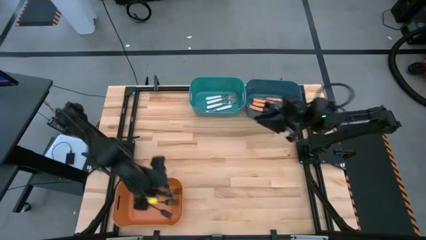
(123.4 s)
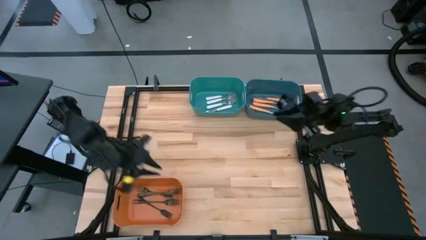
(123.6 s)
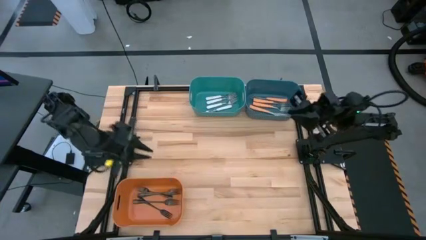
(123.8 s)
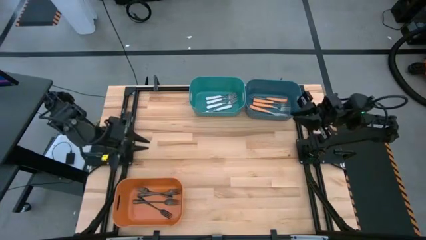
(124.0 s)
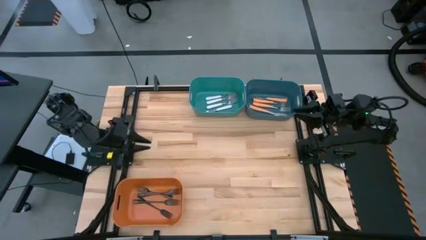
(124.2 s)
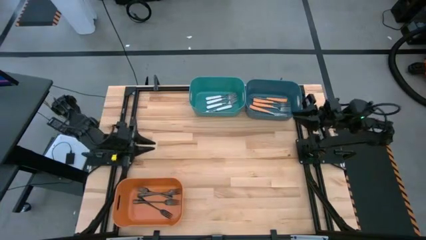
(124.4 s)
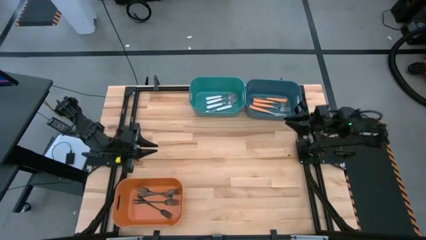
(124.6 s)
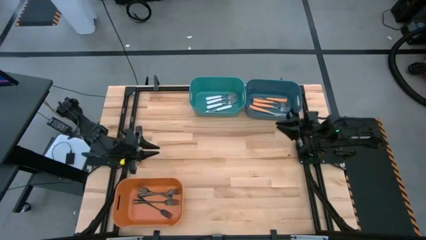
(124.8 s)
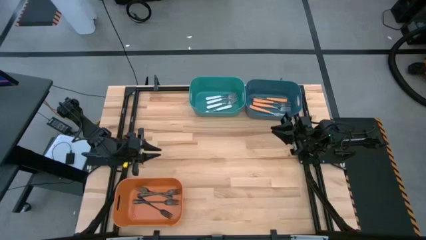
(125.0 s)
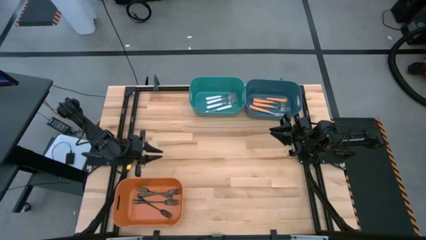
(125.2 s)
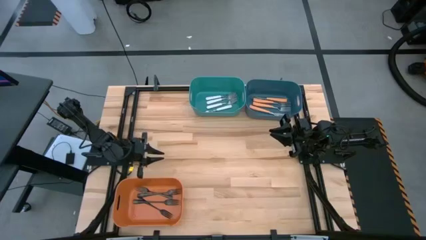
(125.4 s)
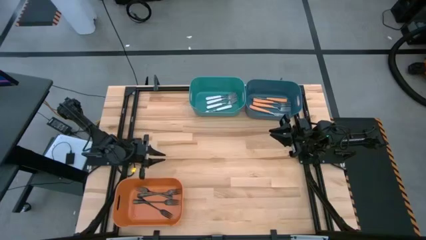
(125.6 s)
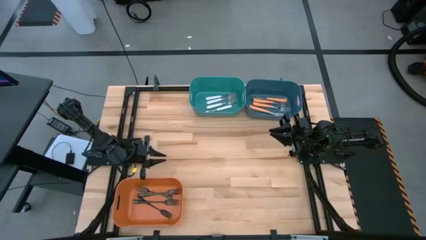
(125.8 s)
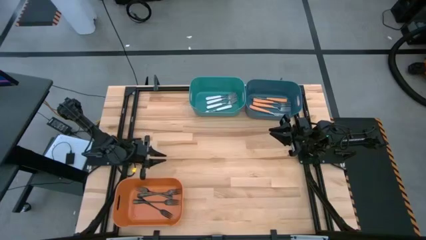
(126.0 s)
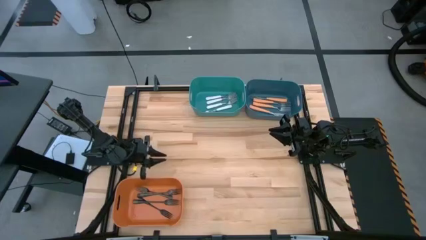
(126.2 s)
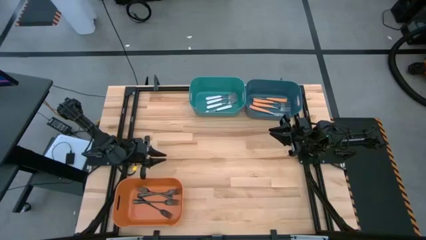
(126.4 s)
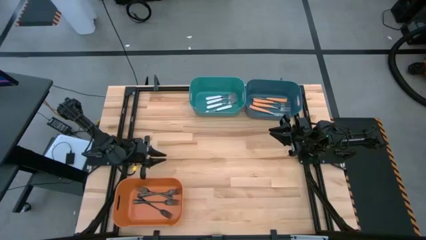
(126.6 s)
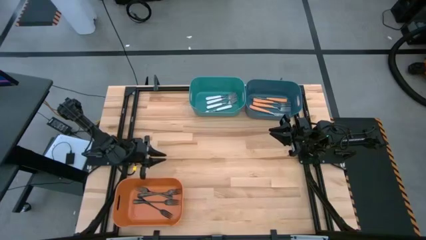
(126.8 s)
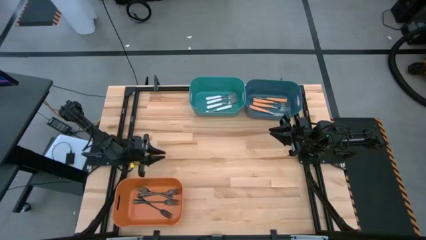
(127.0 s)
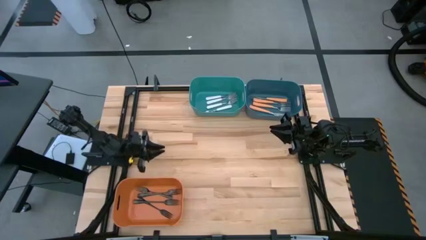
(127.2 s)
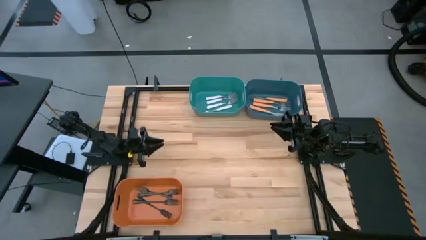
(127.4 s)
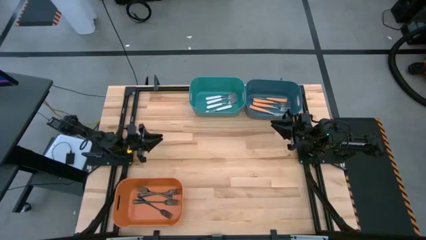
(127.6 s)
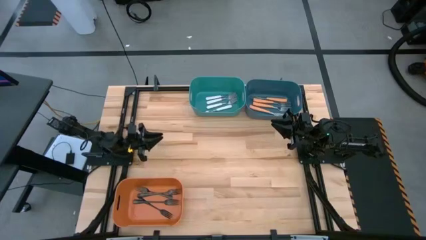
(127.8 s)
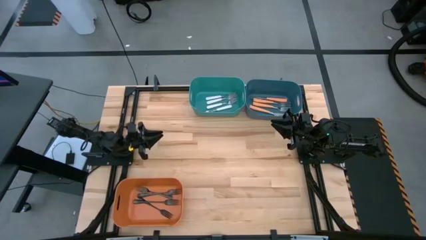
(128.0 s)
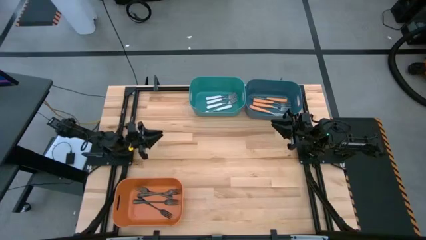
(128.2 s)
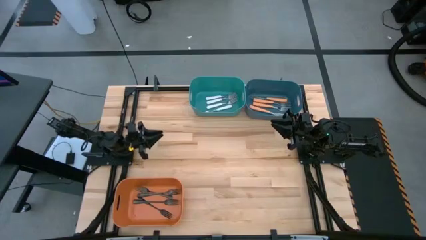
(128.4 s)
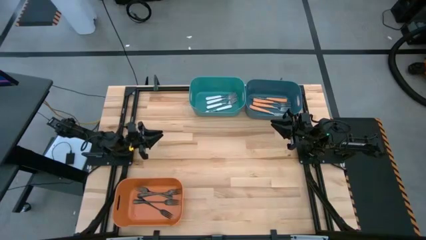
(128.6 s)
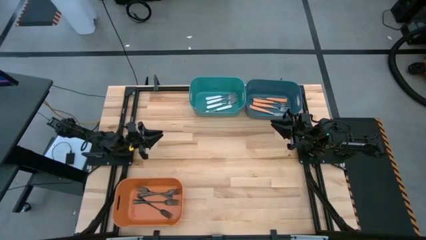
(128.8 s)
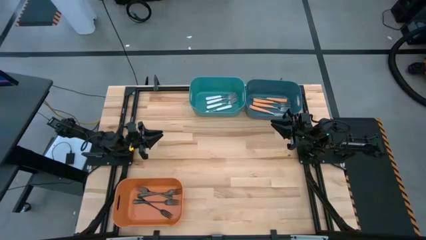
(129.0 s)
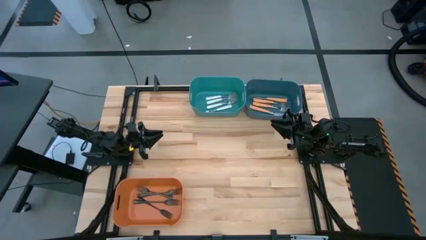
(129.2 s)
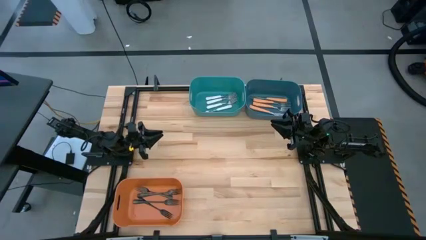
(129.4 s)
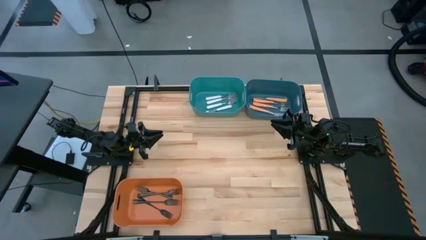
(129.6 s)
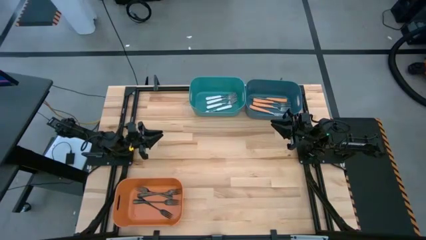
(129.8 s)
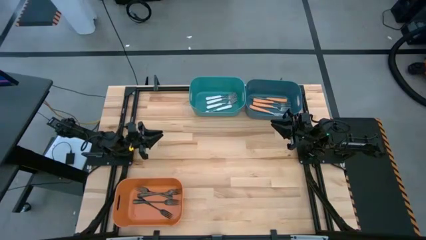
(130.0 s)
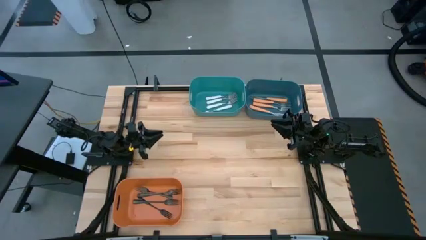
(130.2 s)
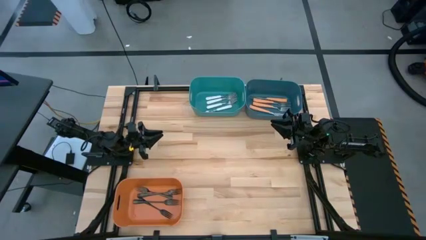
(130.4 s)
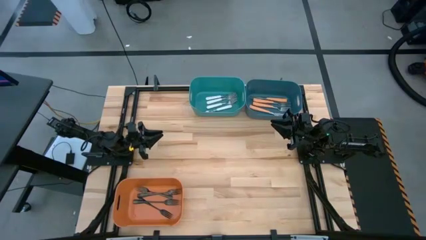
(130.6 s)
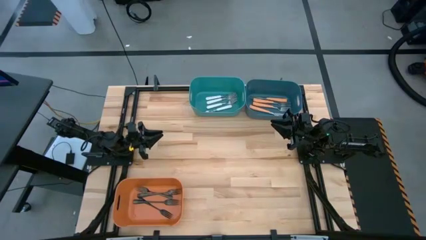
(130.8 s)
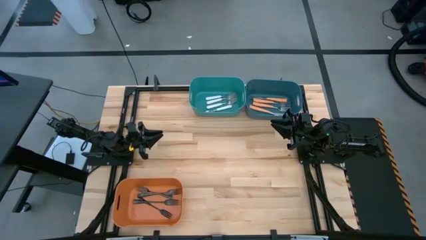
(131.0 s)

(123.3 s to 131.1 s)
Task: Sort silverware by color (type)
Return to Home Position

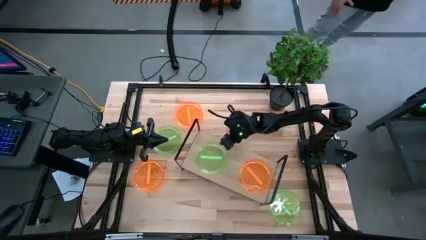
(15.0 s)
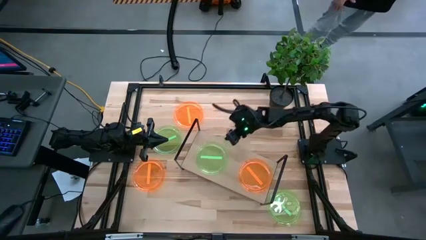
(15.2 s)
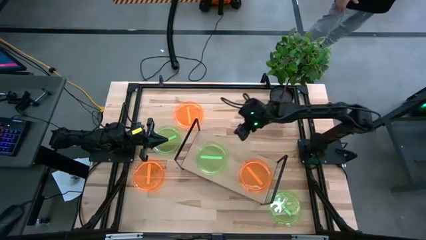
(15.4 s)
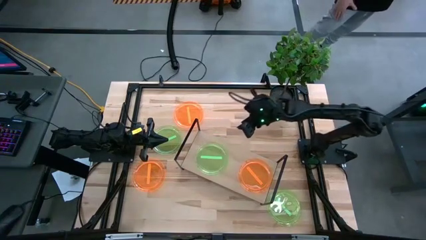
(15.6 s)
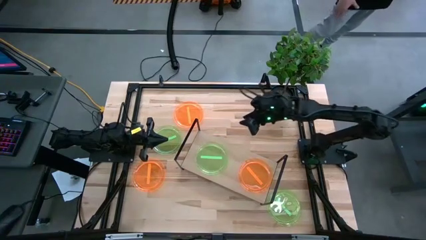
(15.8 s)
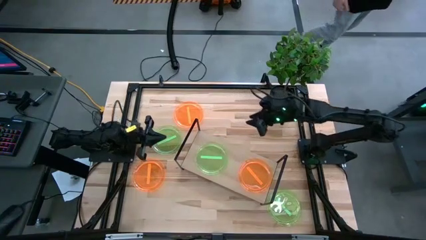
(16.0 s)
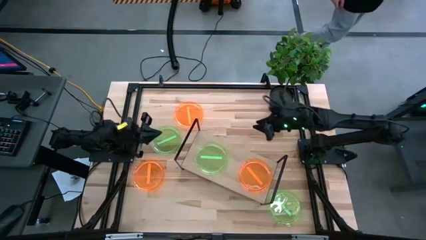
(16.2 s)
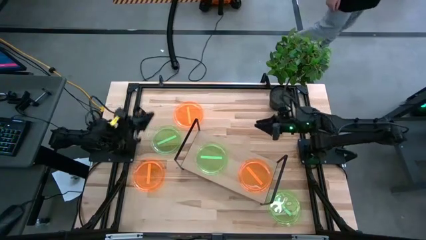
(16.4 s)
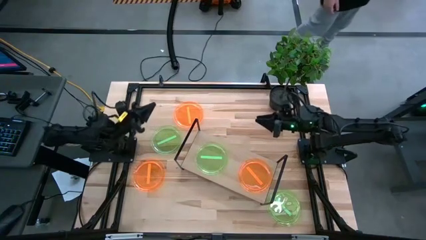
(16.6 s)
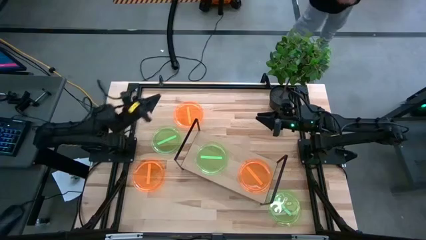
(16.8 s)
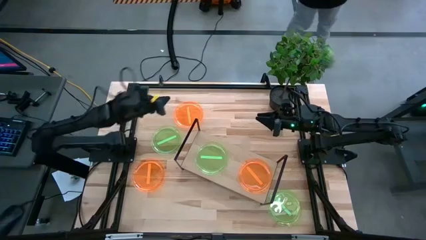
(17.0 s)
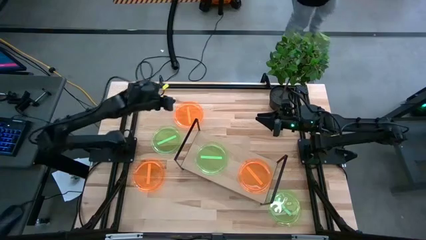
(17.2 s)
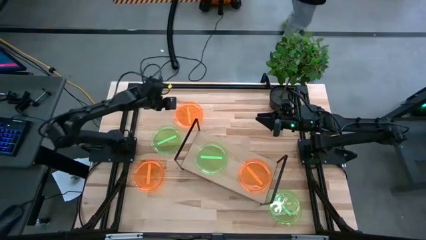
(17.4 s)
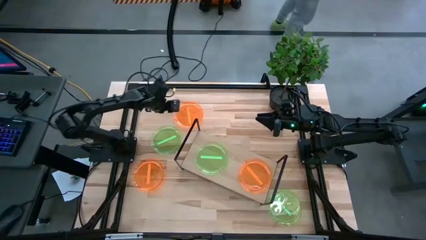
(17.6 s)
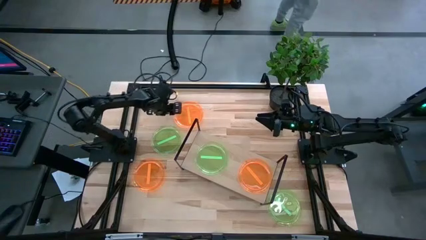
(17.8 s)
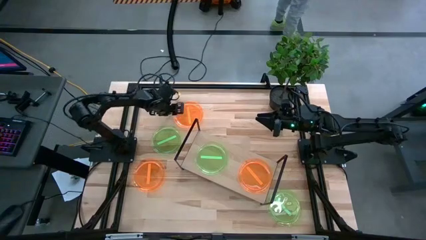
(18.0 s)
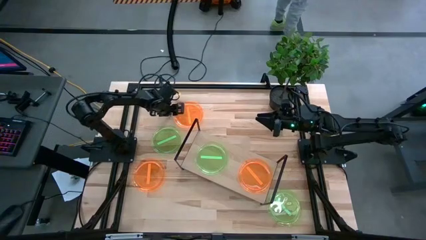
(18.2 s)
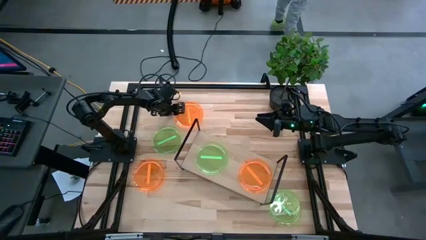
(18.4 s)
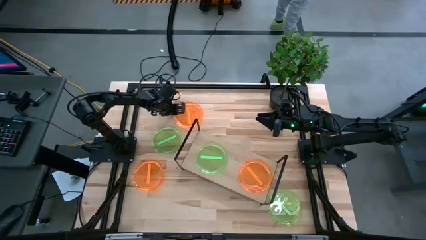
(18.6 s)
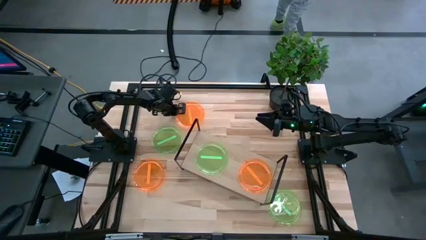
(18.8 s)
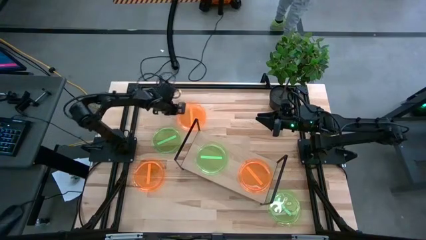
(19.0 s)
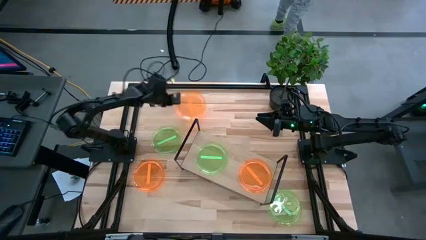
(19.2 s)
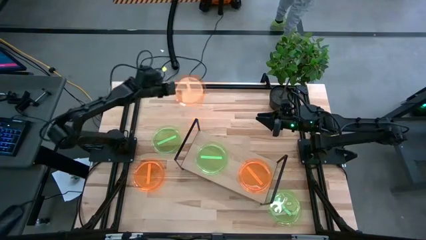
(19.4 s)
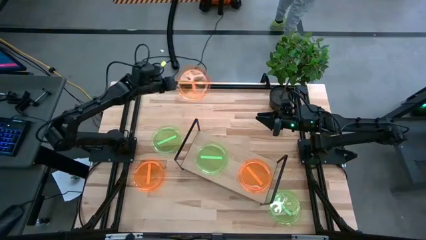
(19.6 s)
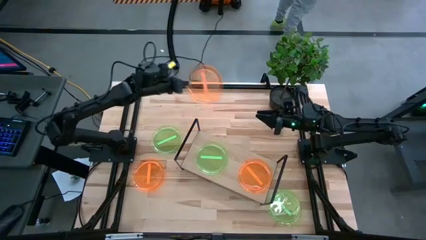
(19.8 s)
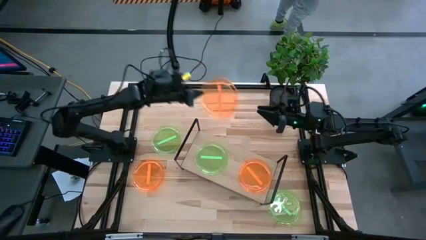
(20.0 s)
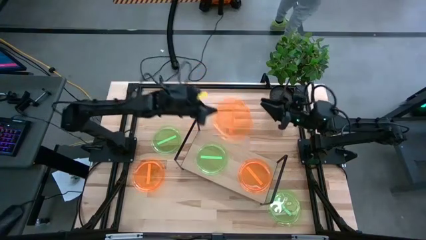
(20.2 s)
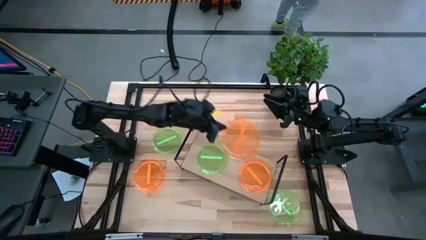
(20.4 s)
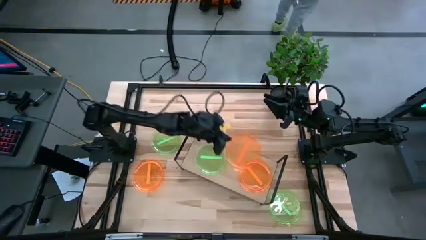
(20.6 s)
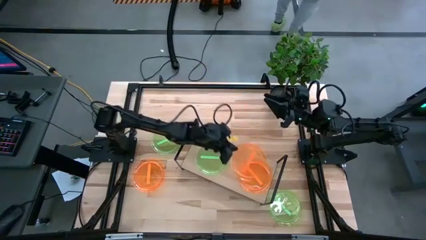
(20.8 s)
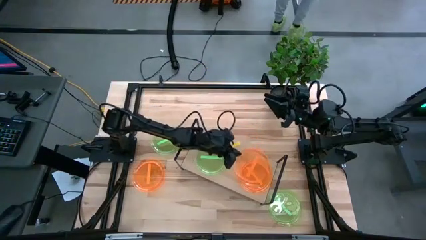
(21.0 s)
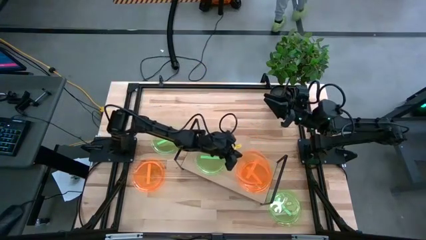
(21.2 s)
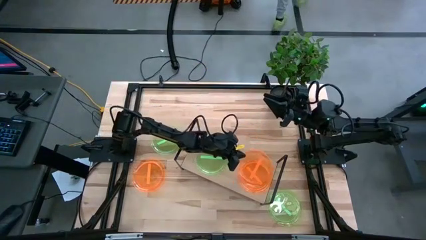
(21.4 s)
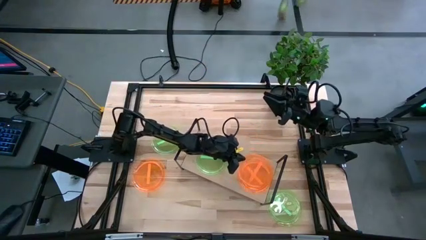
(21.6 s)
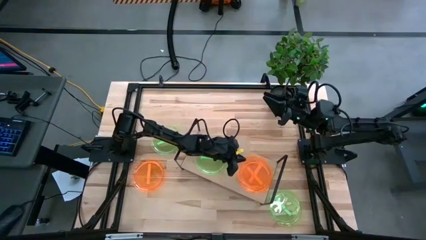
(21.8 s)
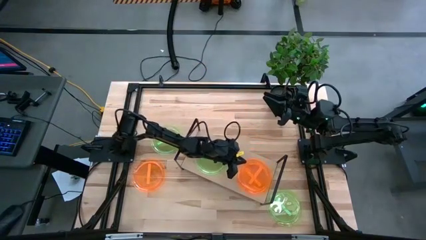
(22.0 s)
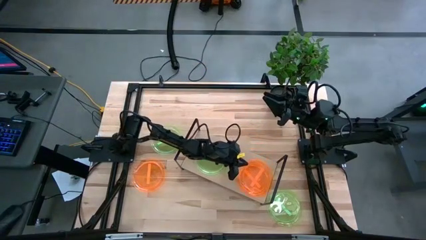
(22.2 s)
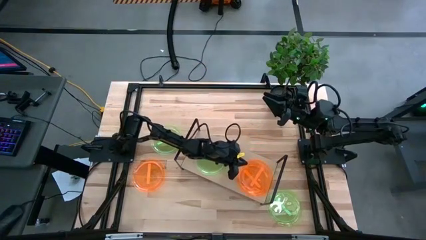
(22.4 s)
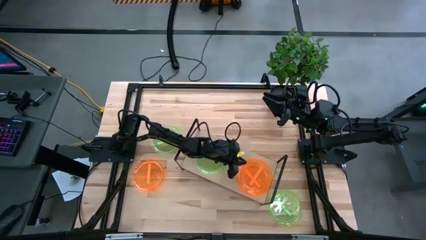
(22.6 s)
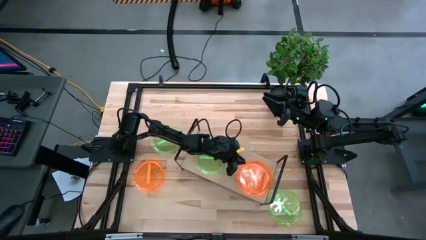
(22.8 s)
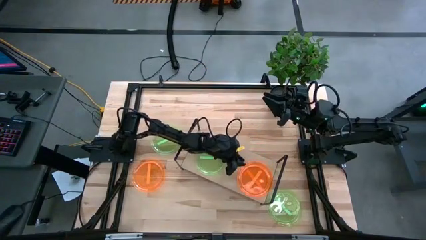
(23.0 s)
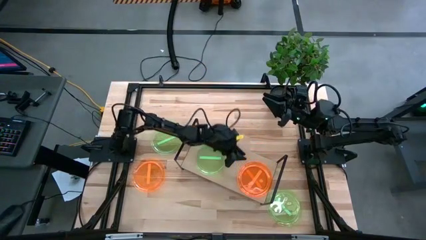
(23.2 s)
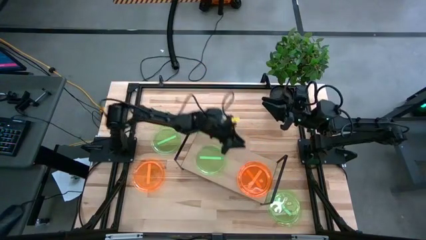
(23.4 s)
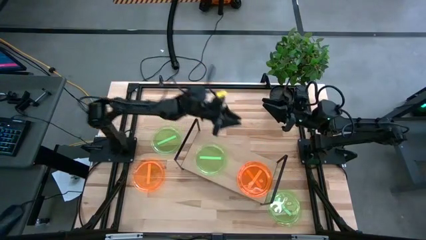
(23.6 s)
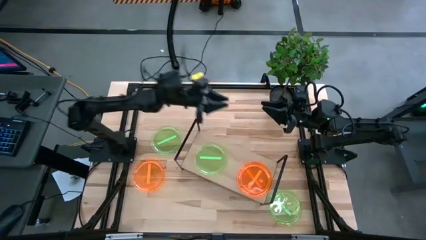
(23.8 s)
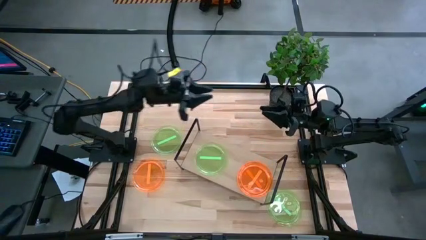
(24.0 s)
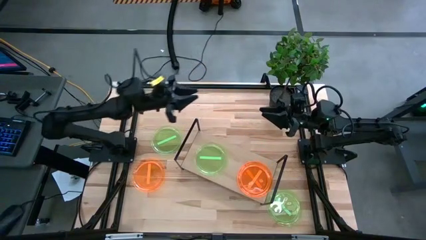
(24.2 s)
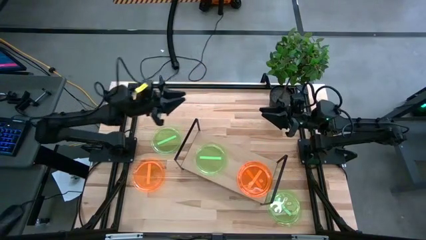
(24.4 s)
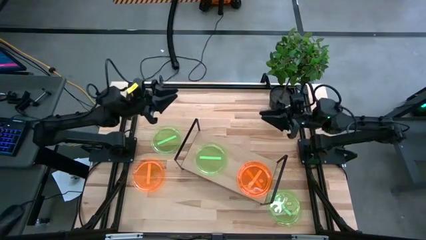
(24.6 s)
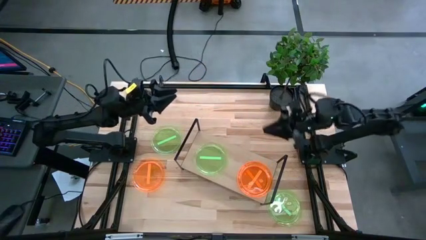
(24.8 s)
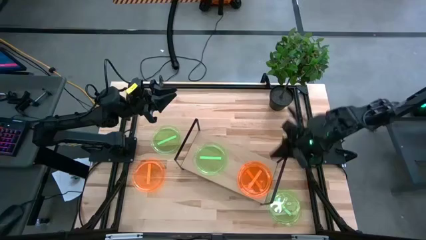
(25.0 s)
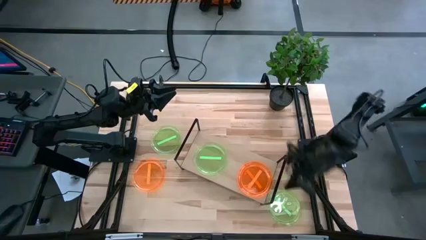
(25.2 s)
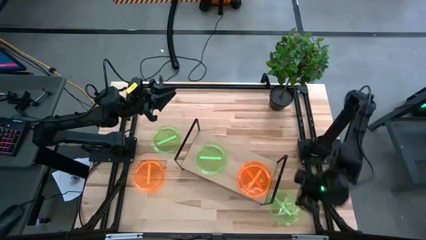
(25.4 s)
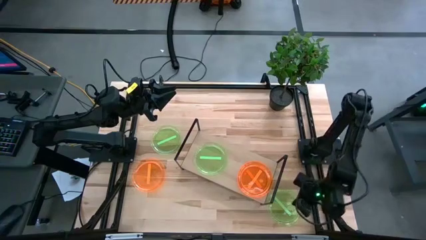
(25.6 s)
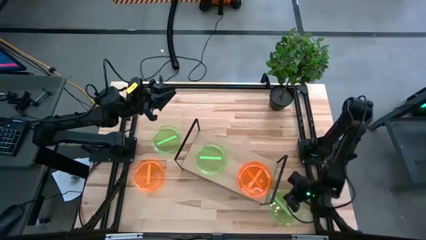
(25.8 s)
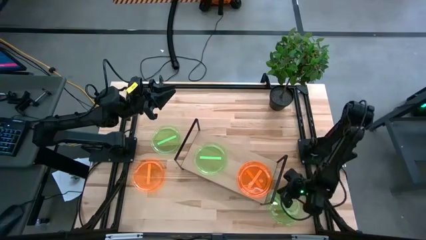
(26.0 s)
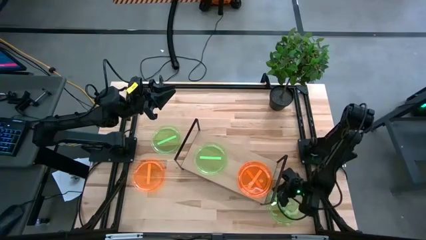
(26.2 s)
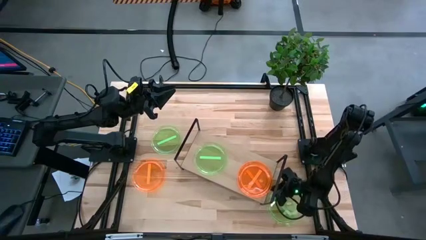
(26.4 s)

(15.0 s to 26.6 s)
Task: Place and stack plates onto a shelf
Stack the top orange plate on the top of the orange plate on the shelf
